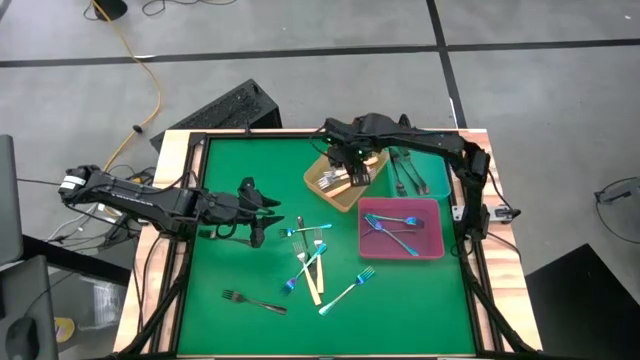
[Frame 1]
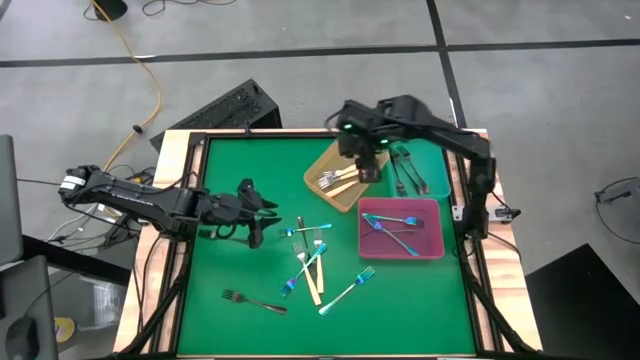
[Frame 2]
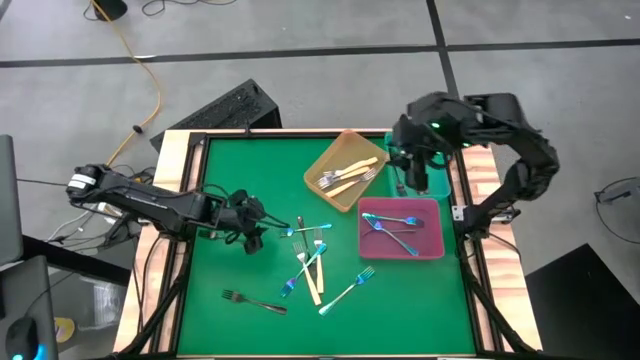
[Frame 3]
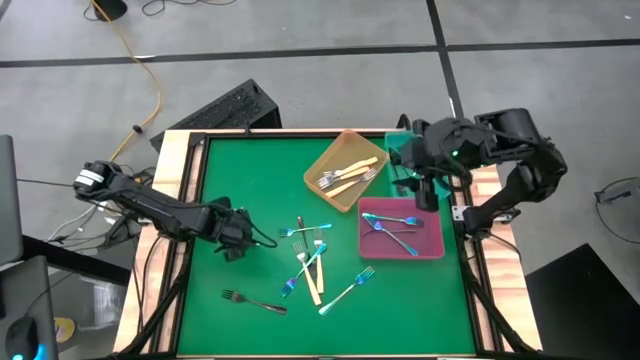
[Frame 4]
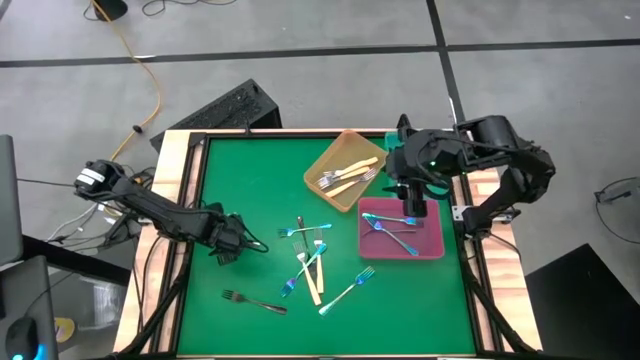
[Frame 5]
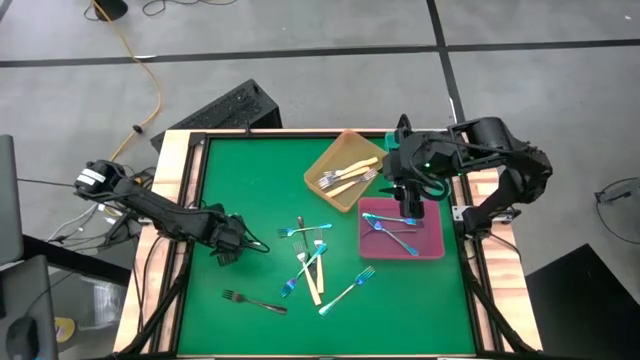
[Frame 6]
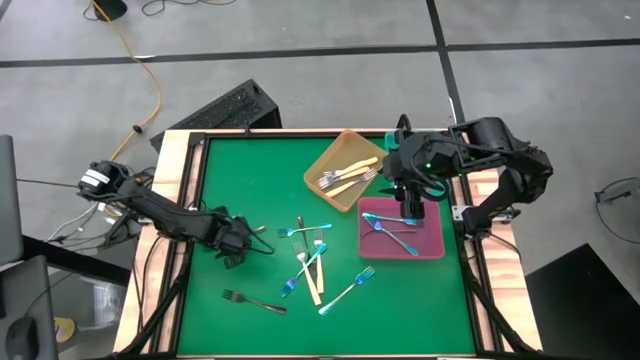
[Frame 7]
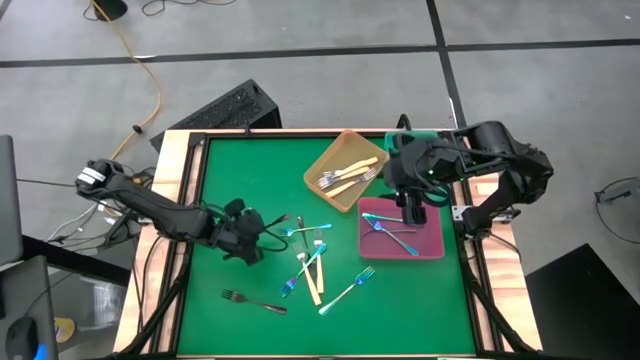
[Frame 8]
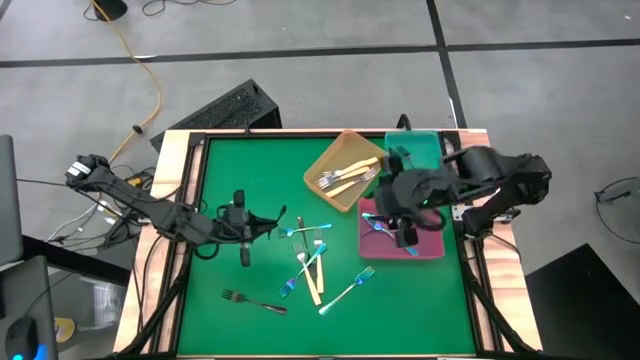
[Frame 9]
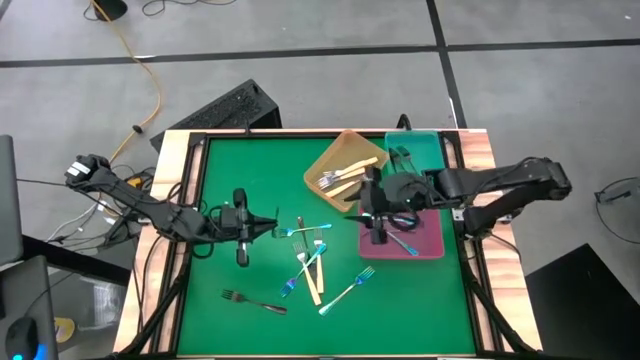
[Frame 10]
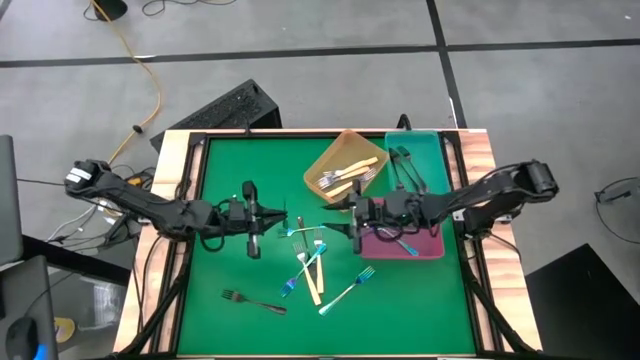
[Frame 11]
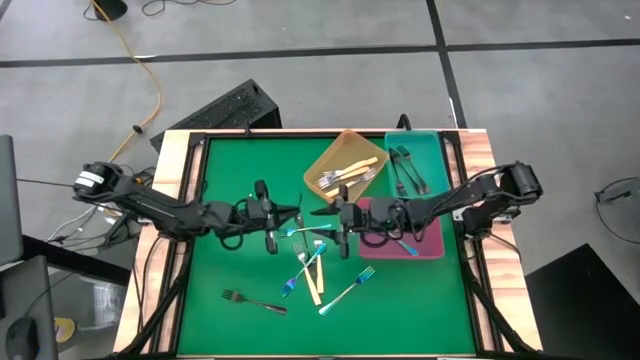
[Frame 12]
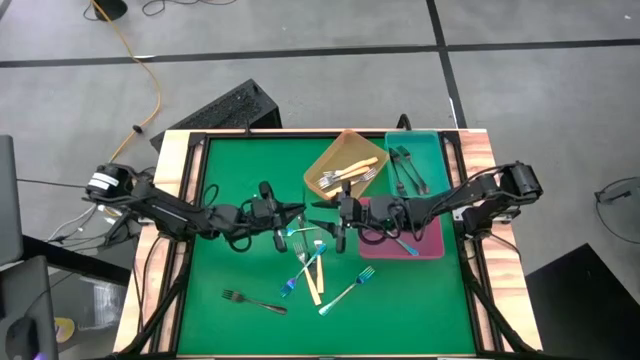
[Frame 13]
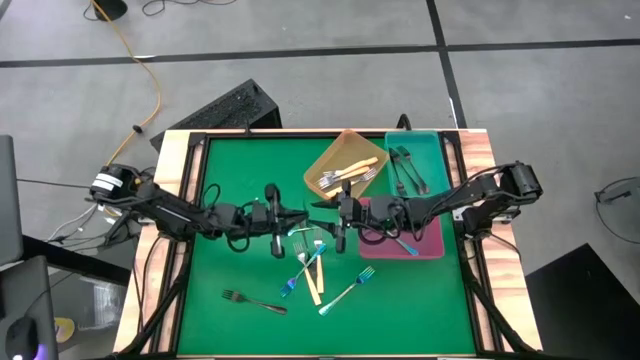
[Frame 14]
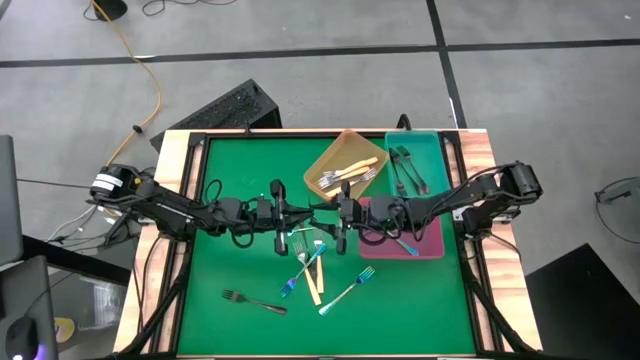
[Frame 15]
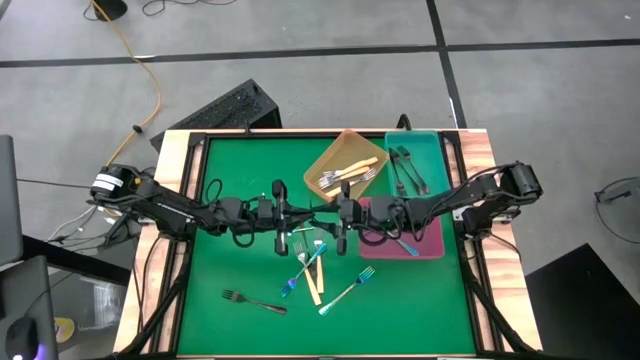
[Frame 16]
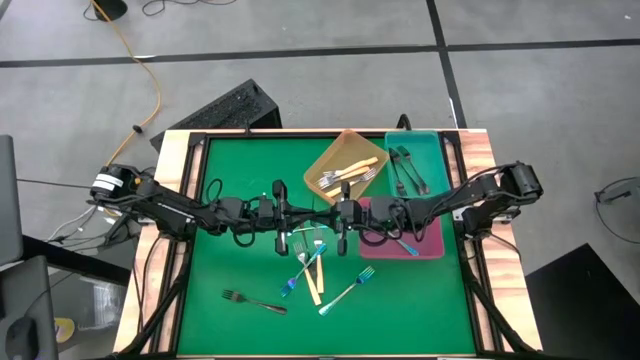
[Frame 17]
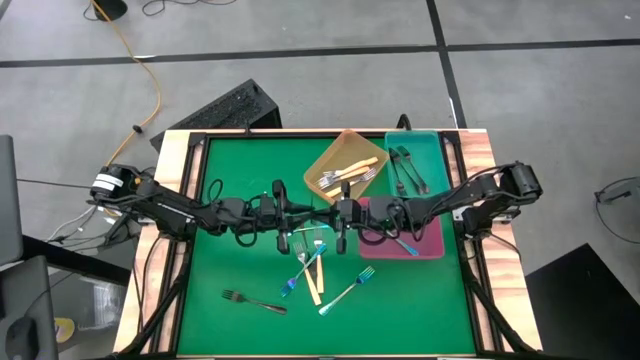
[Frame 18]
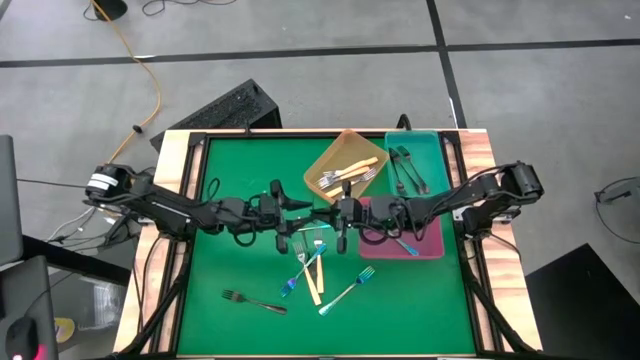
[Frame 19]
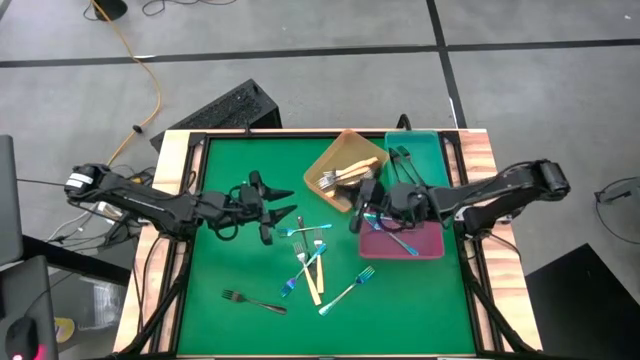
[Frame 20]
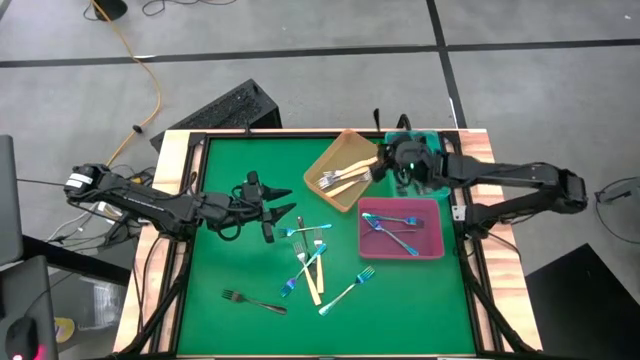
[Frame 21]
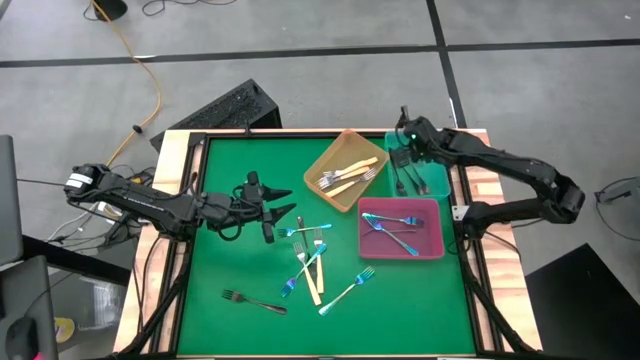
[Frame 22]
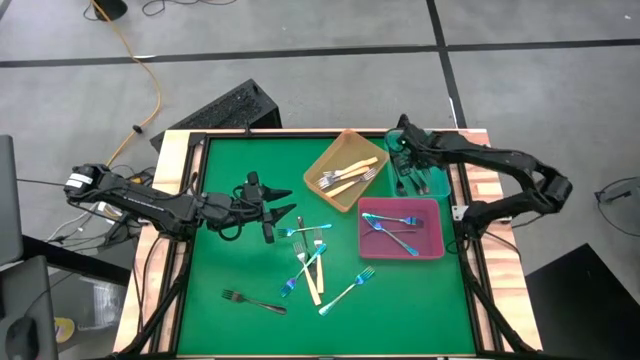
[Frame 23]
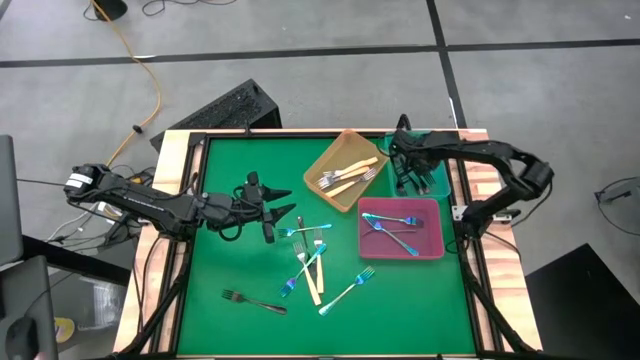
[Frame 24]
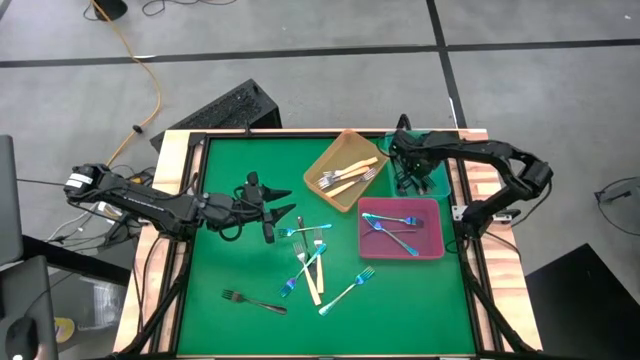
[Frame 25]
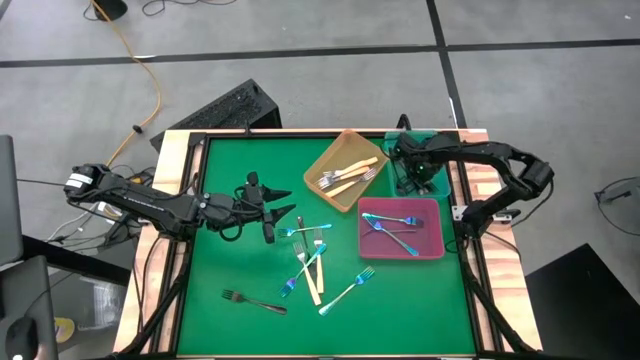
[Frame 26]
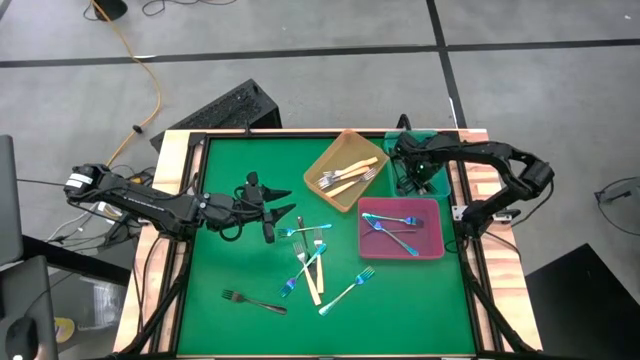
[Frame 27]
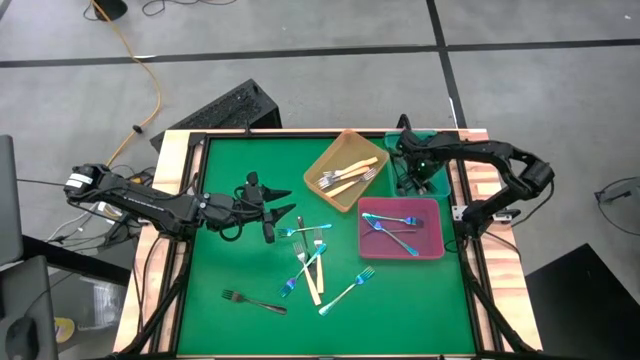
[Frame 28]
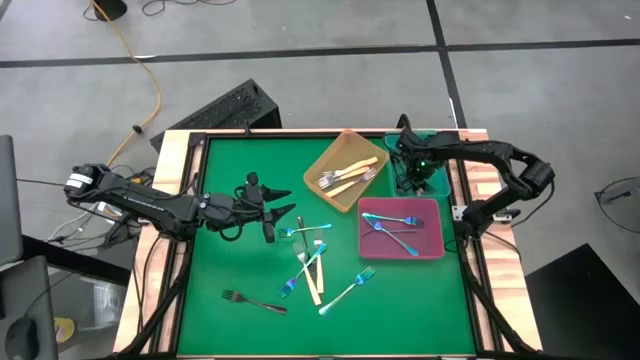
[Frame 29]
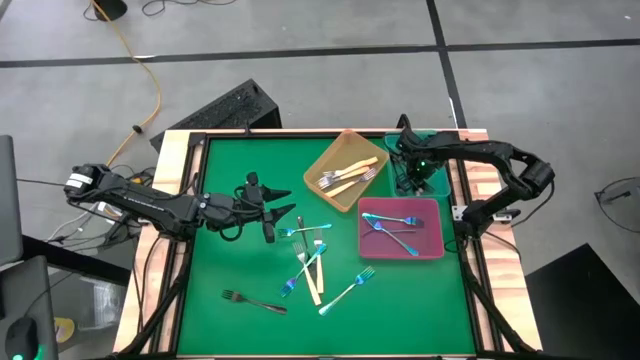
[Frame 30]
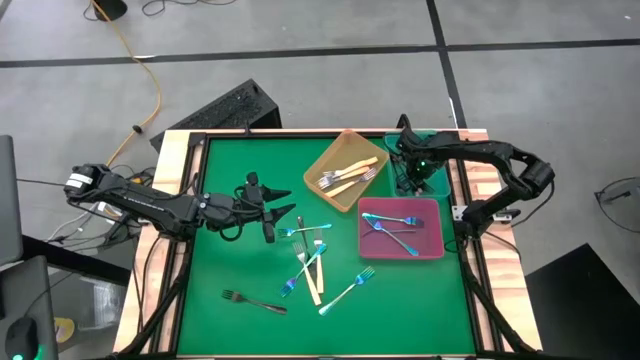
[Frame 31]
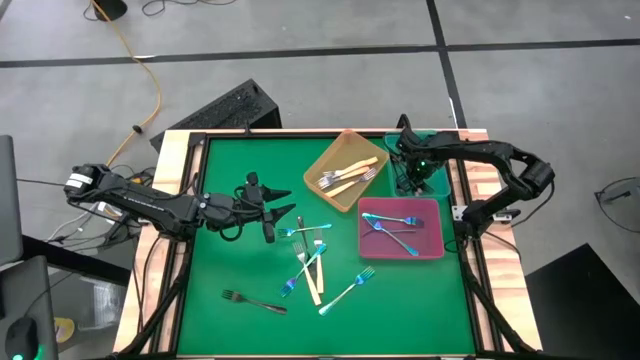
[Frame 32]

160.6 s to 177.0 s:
Task: Sort silverware by color (type)
Put the black fork into the blue bin

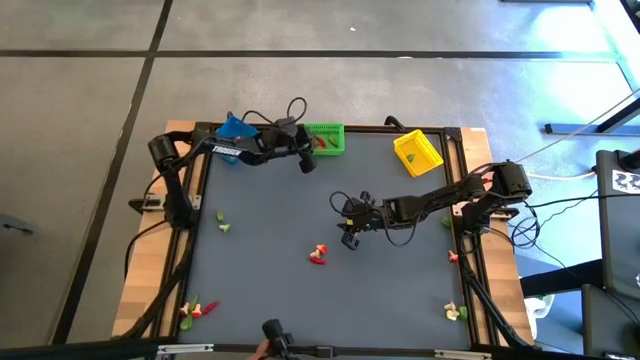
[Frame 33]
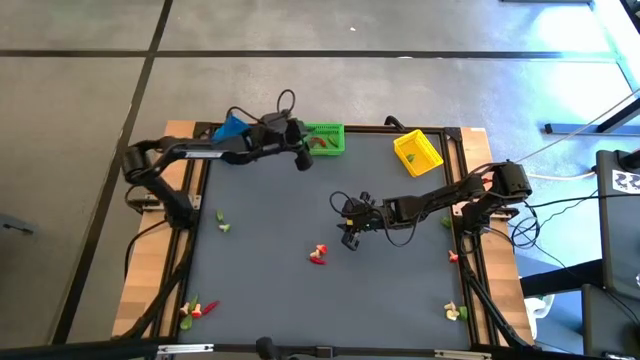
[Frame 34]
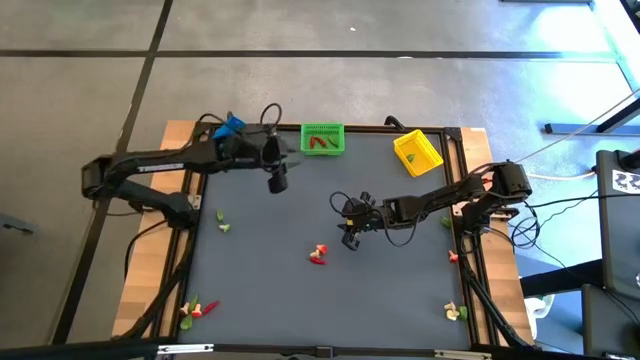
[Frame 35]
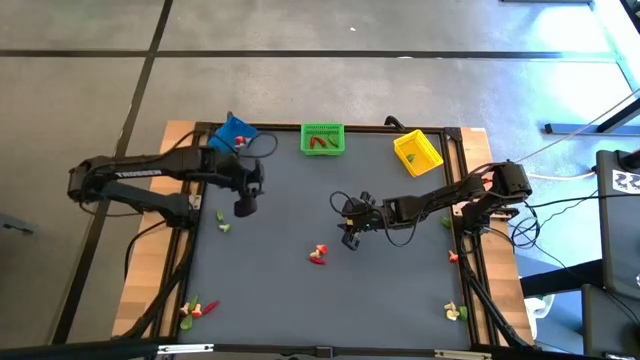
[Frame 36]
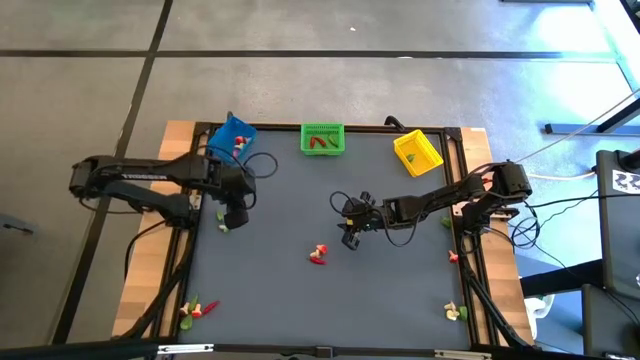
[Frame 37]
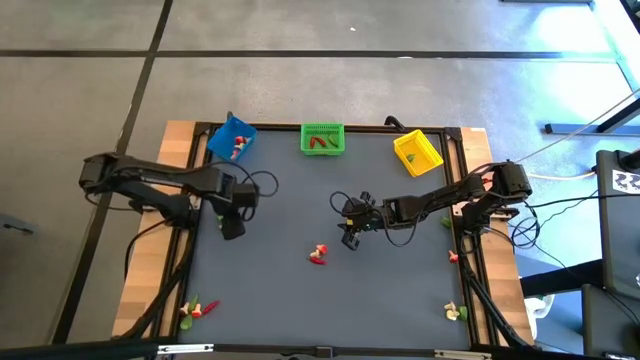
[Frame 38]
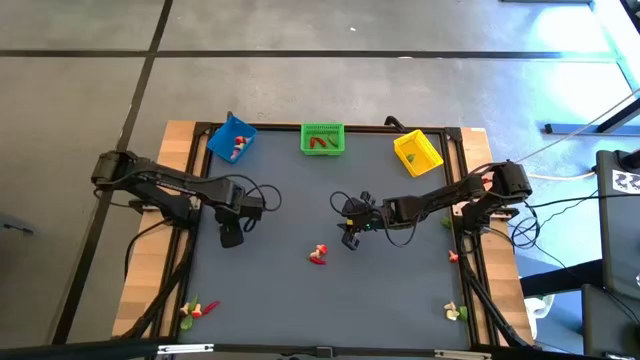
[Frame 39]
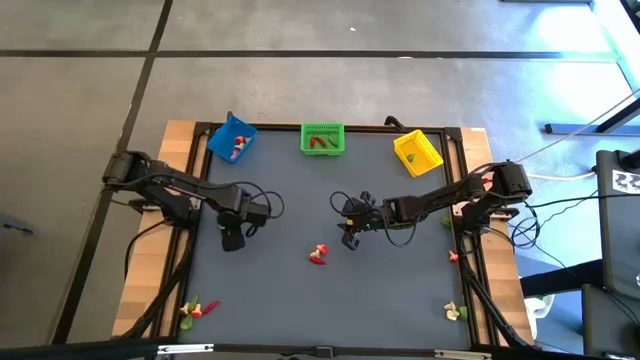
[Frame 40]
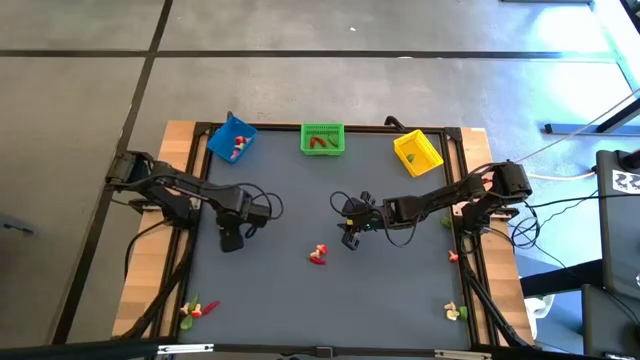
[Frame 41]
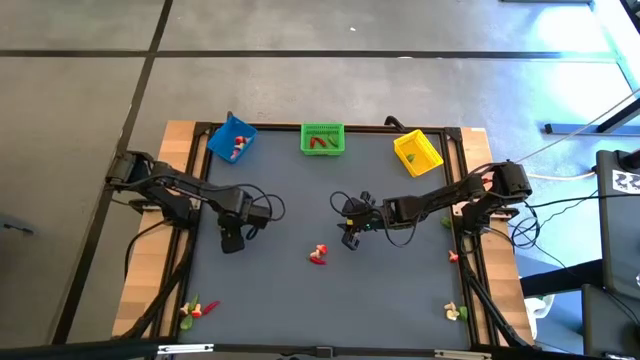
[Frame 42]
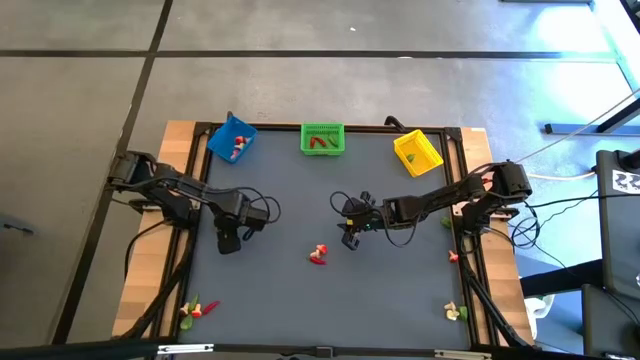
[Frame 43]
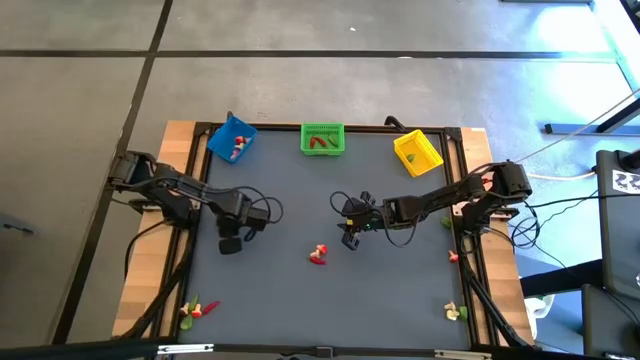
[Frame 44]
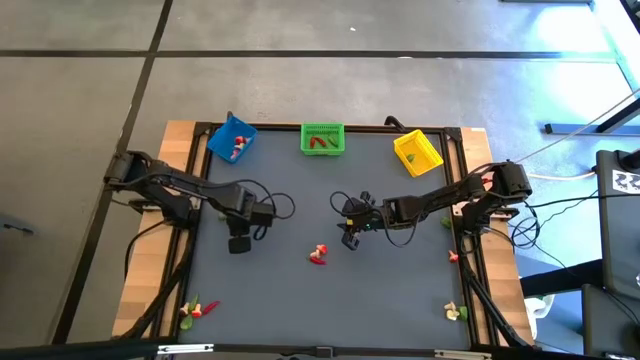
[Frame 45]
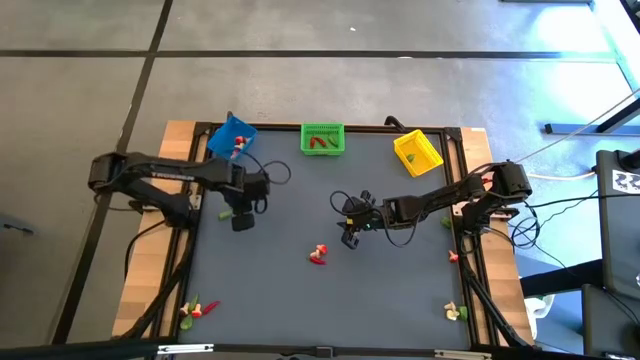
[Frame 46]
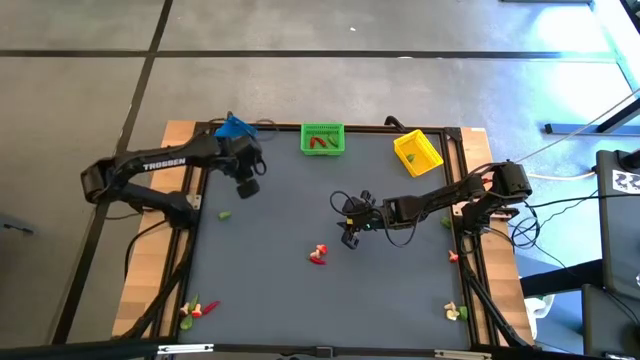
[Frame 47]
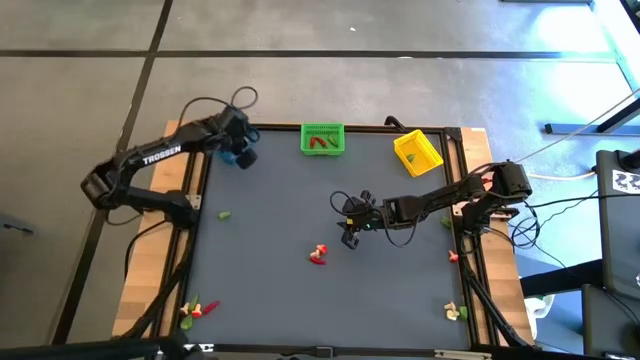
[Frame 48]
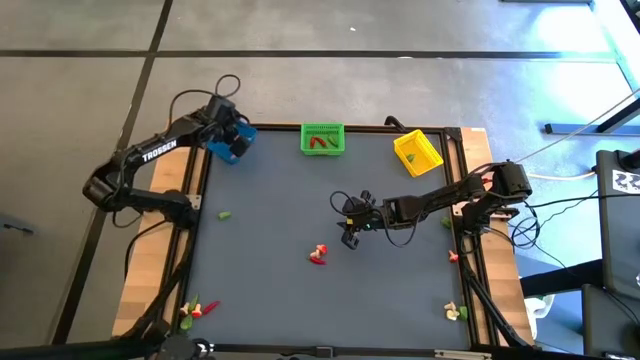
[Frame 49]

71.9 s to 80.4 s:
Task: Sort produce into baskets
Put the green mushroom into the blue bin
